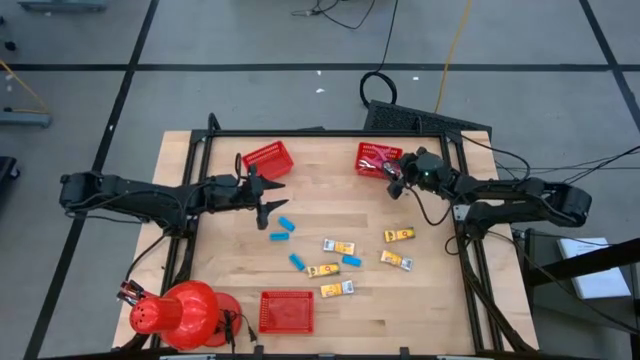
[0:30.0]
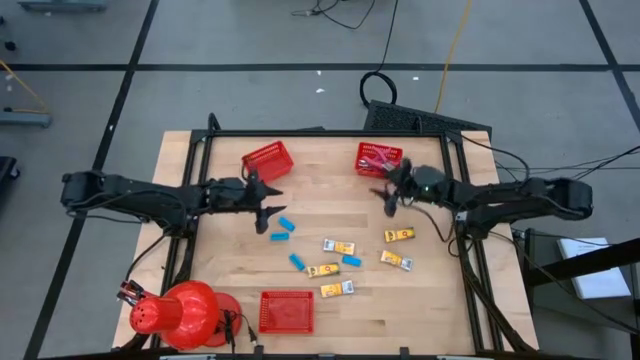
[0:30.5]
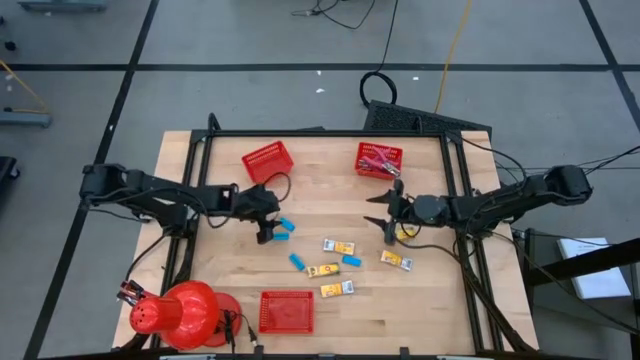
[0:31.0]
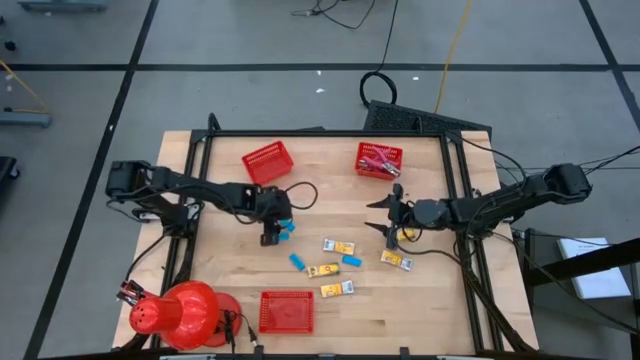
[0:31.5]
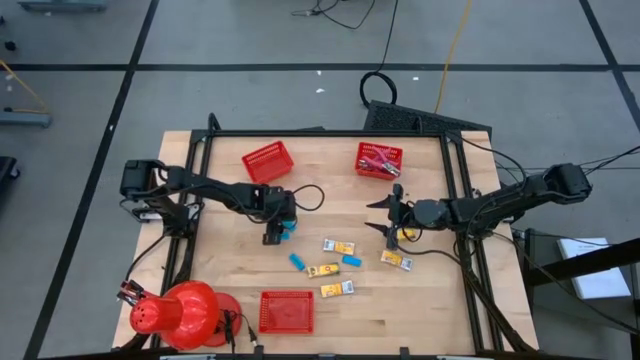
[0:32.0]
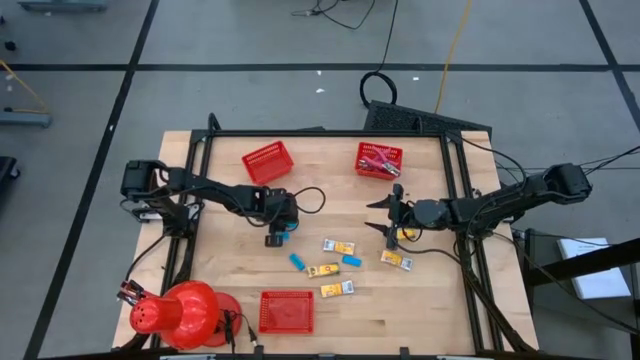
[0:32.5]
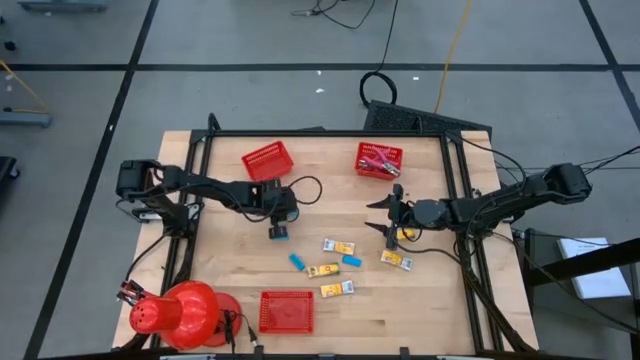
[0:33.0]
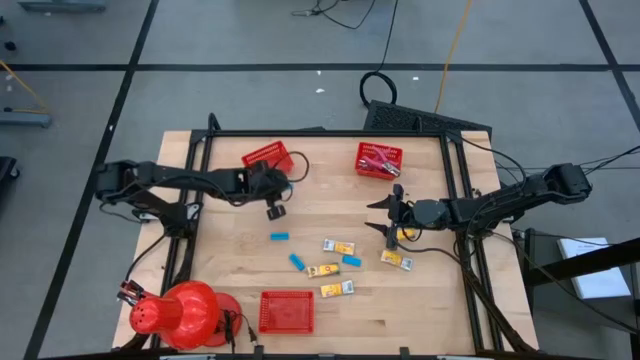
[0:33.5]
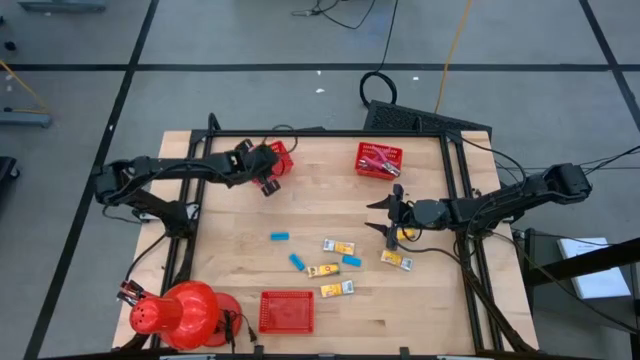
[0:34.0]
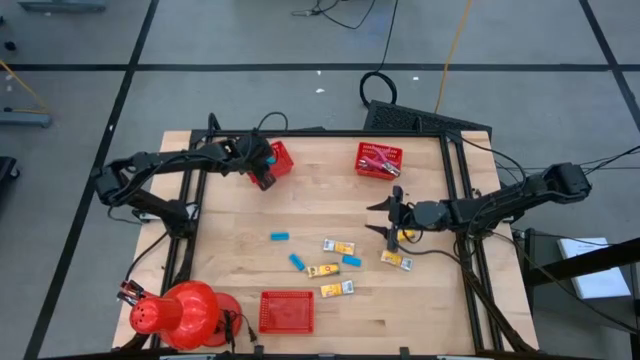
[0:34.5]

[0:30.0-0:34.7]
Task: Pick & Place School Supplies
Put the blue eraser into the top left red bin

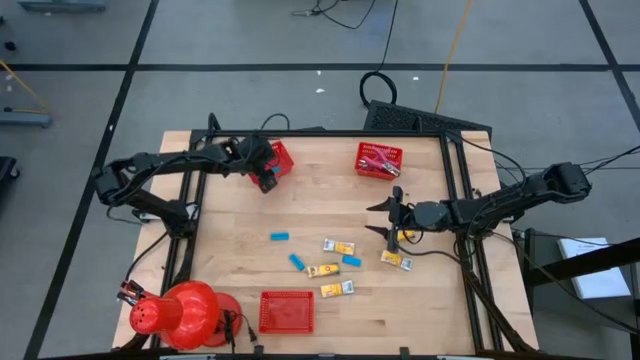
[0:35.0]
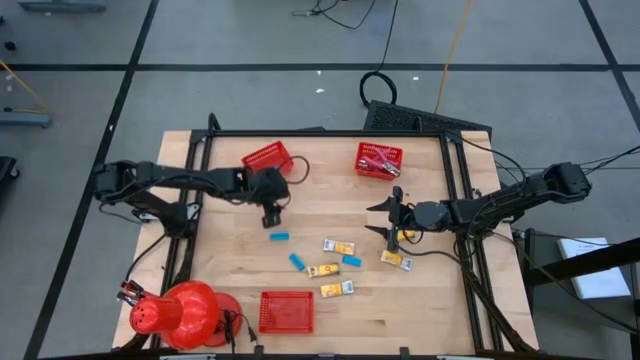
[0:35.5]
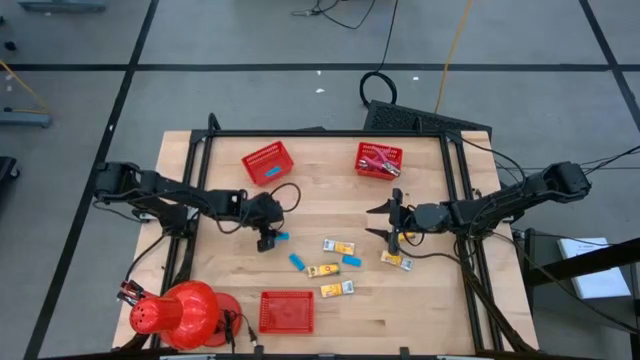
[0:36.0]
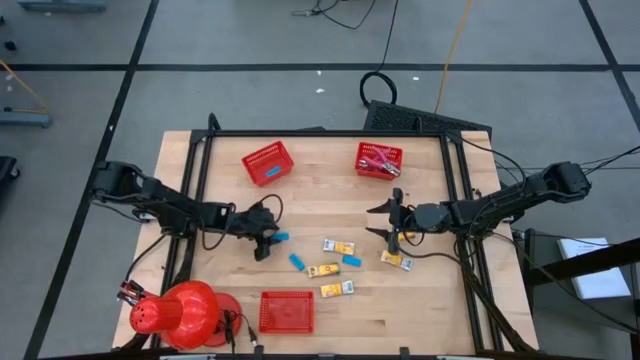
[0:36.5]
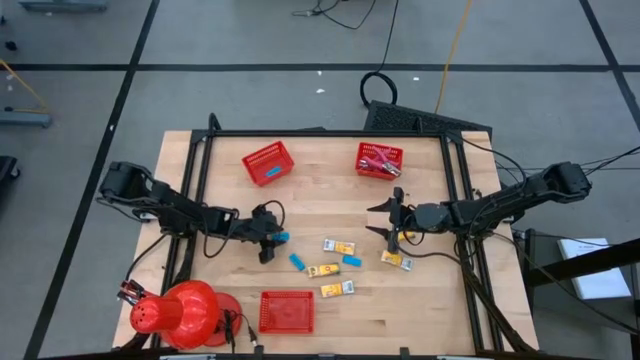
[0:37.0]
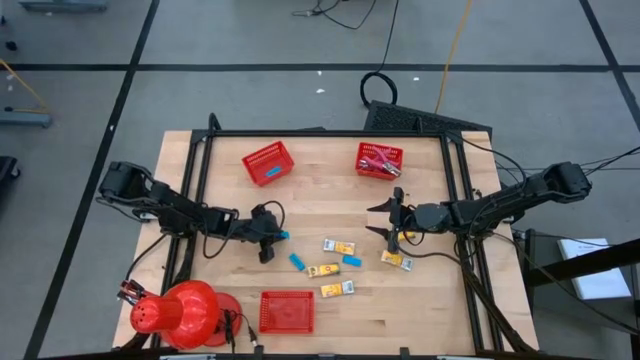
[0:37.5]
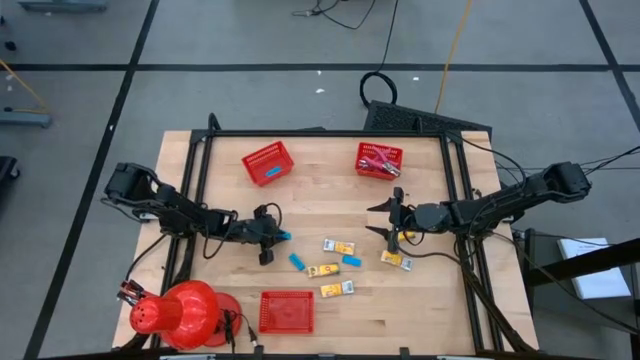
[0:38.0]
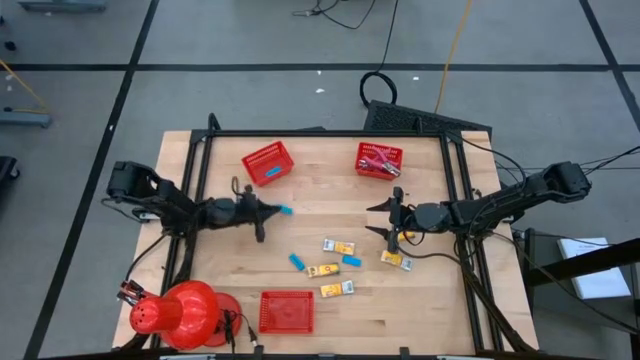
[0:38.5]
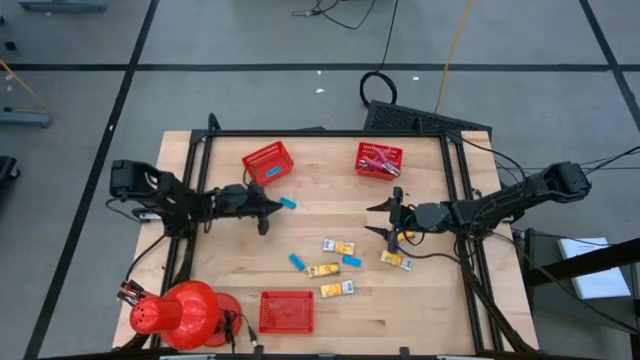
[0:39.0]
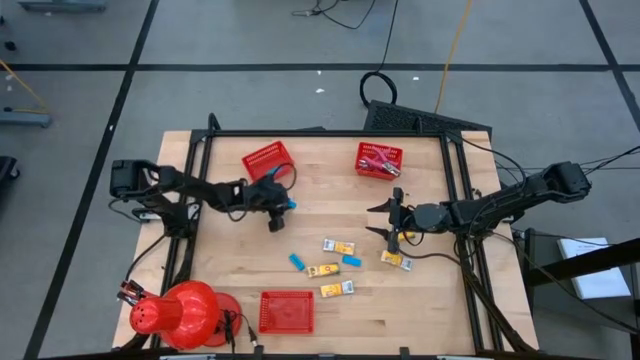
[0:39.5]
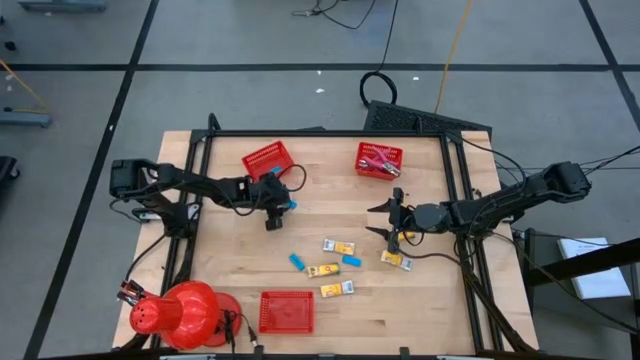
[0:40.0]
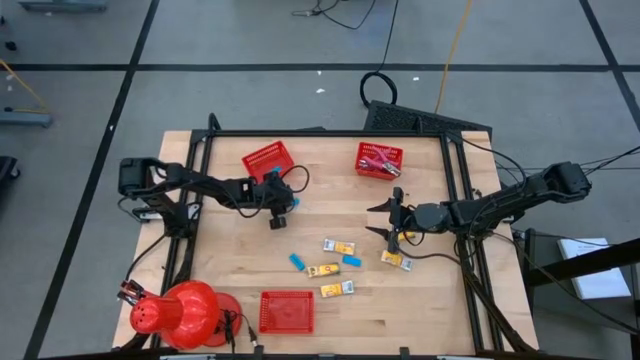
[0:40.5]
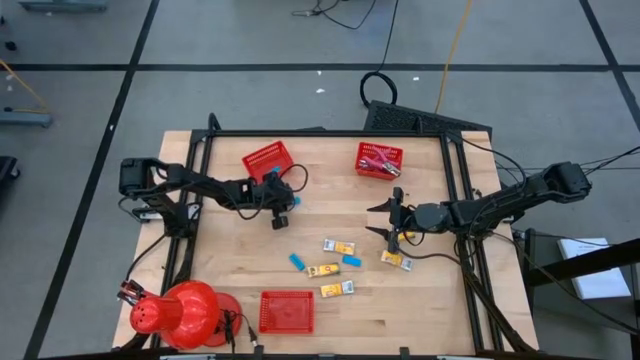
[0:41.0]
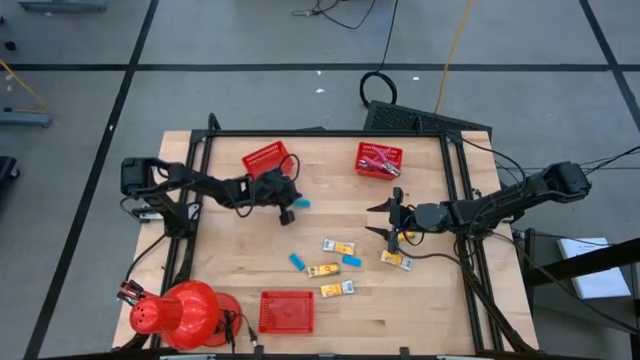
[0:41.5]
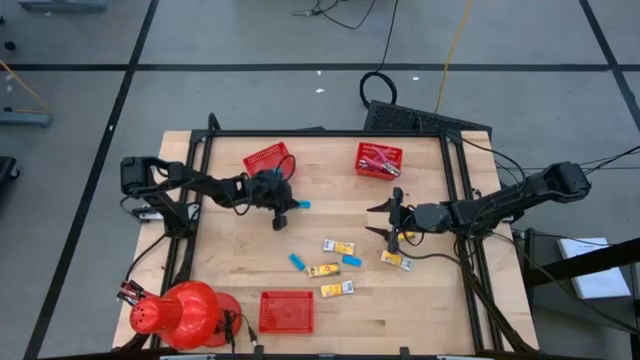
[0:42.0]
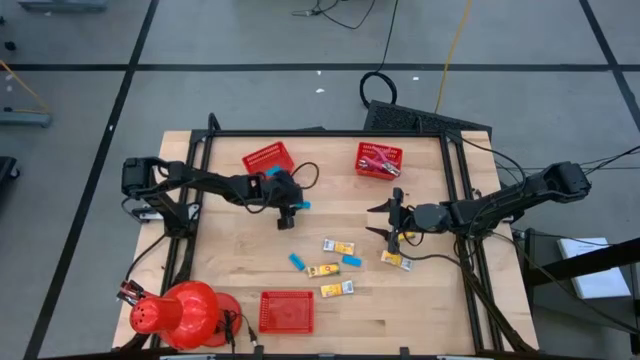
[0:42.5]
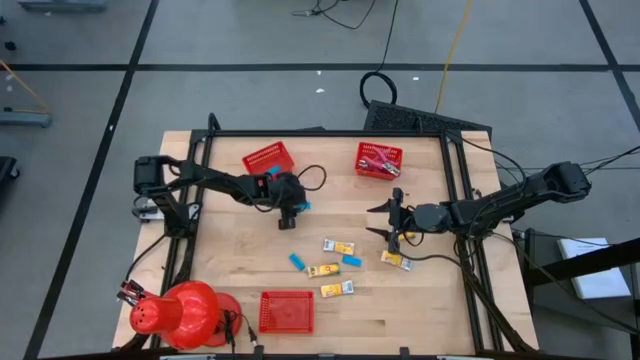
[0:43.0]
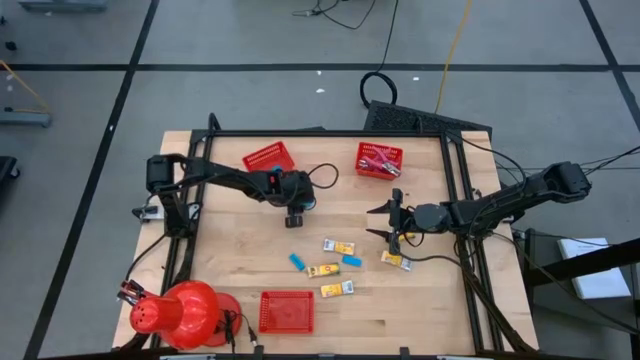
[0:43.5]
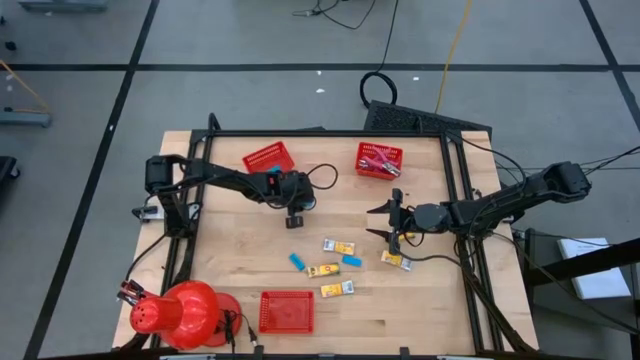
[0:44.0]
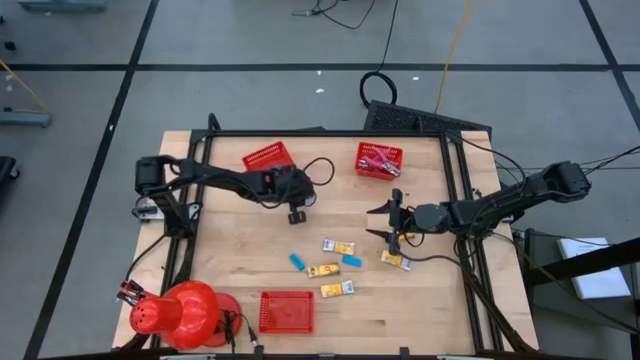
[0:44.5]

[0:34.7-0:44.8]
Put the blue eraser into the top left red bin

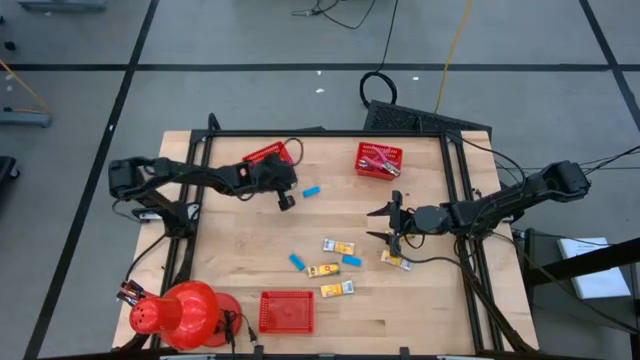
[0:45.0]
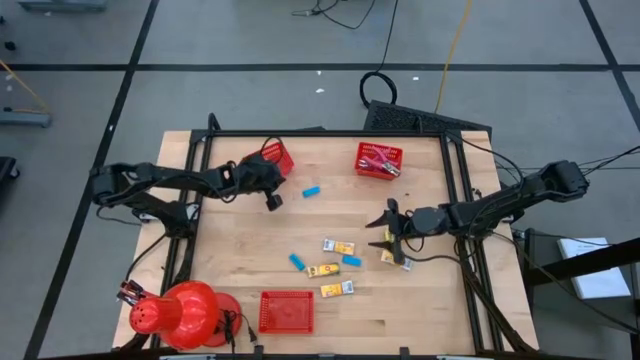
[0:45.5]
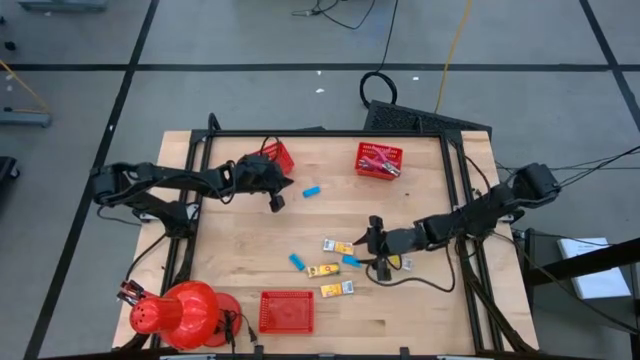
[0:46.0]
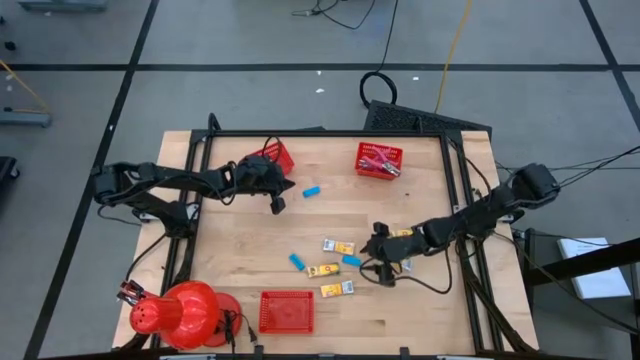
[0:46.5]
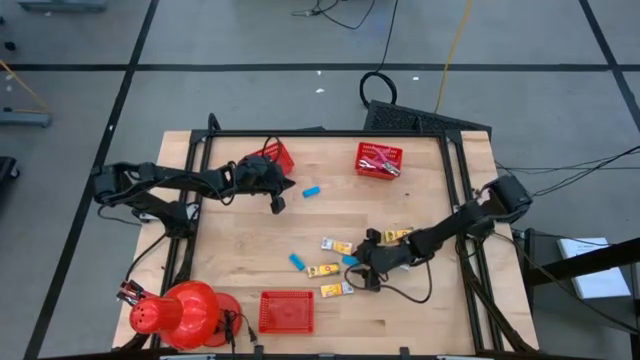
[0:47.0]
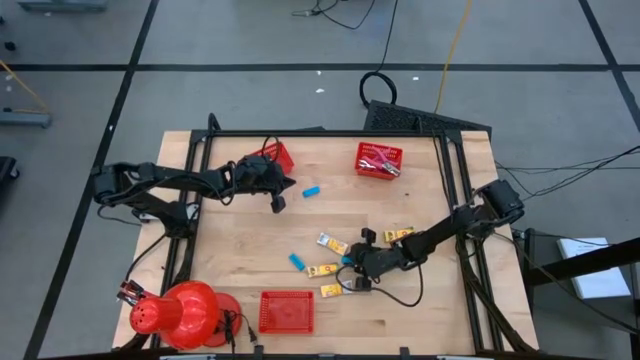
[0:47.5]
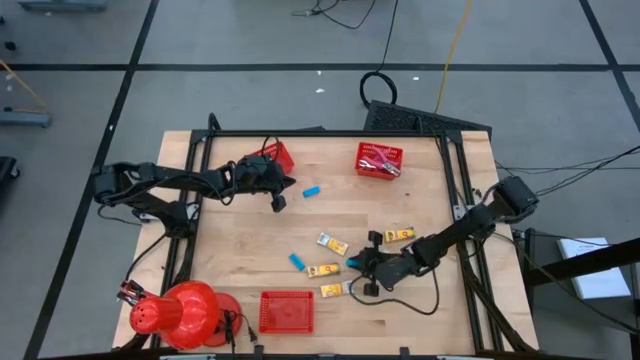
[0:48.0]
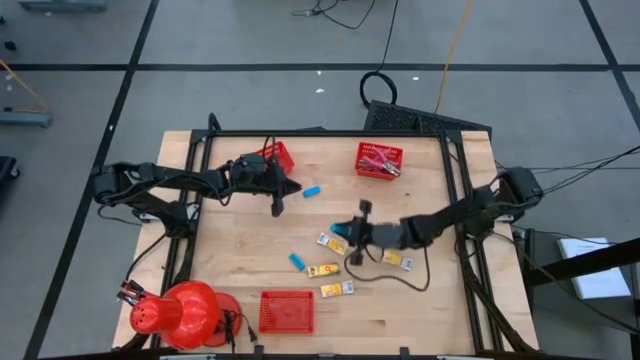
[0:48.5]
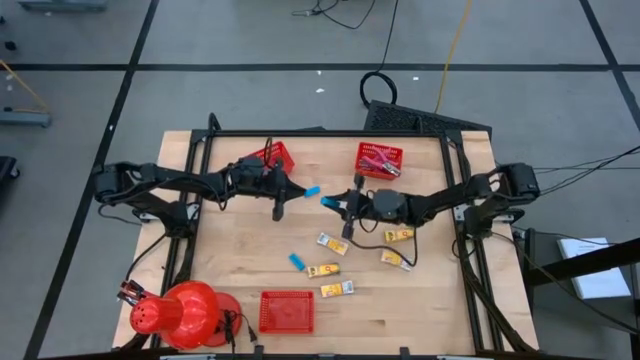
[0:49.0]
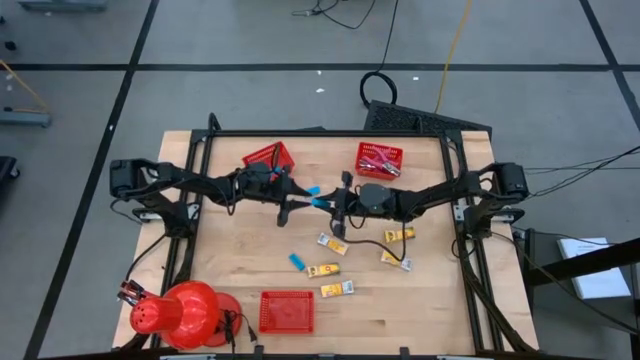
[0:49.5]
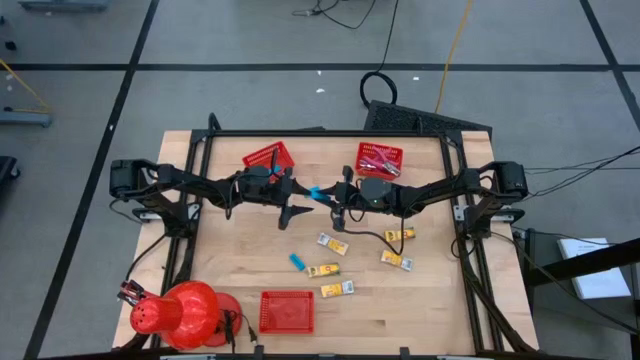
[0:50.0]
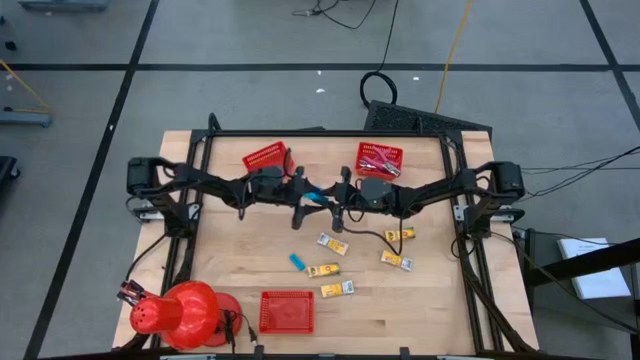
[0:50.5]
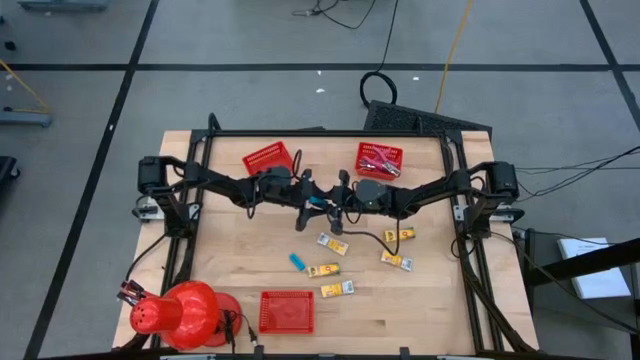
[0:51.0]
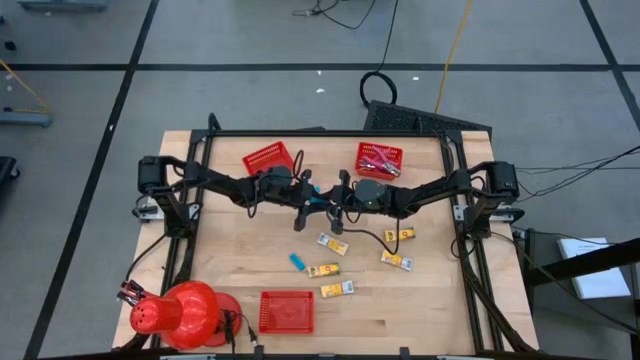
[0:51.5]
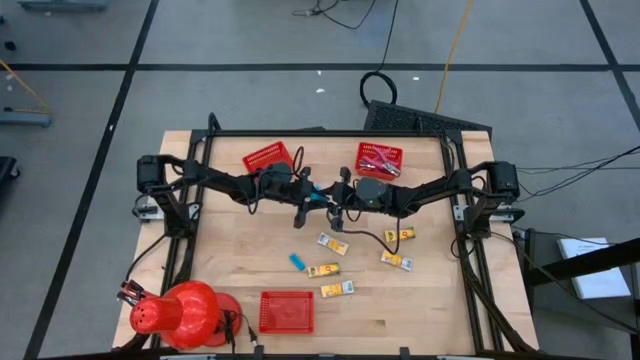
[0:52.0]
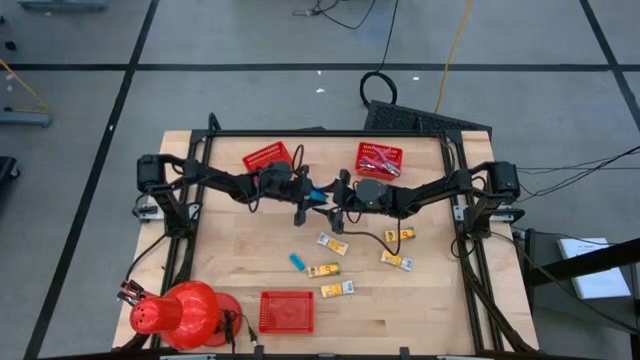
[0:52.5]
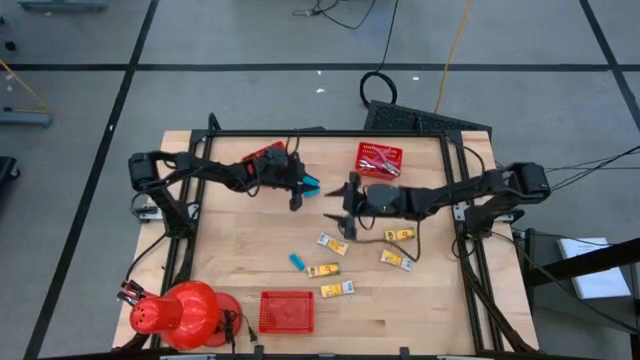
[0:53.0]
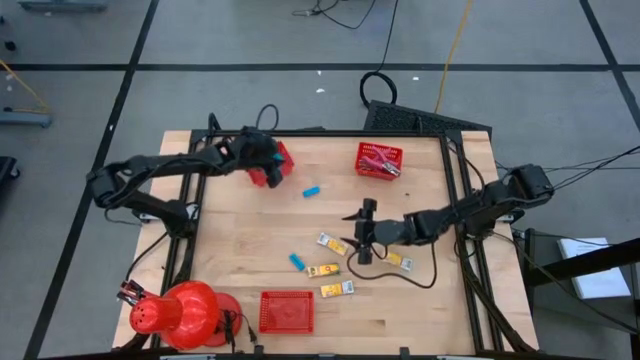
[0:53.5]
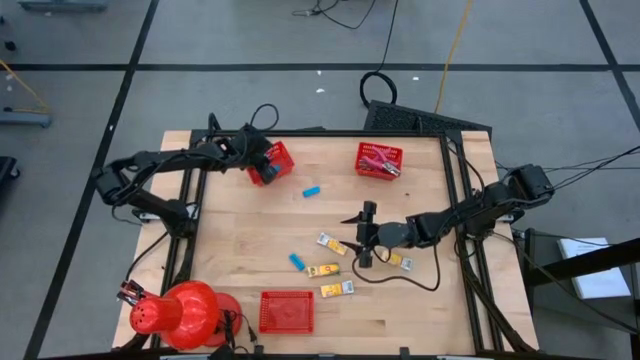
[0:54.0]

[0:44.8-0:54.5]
Put the blue eraser into the top left red bin
